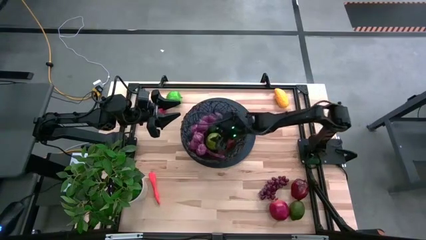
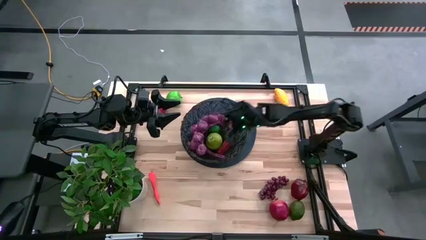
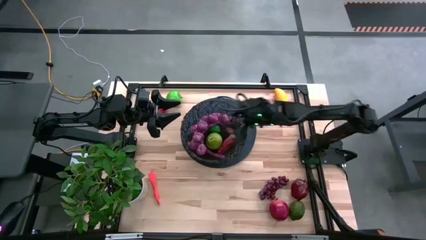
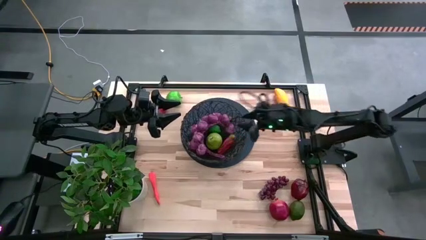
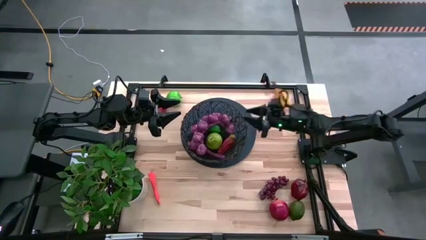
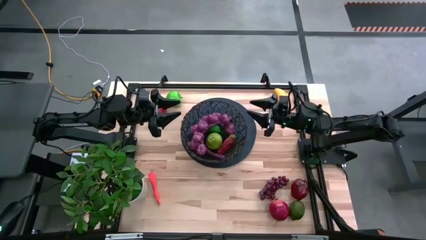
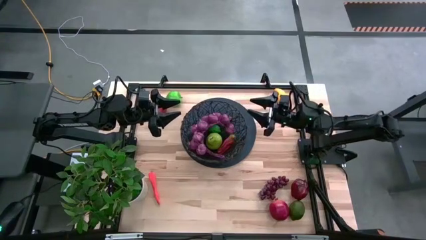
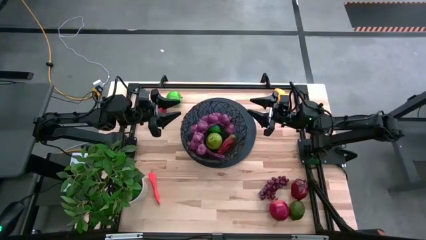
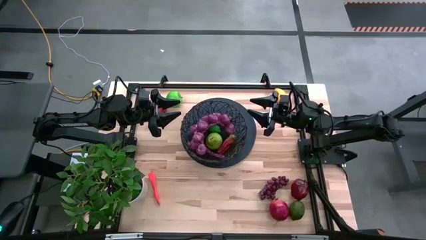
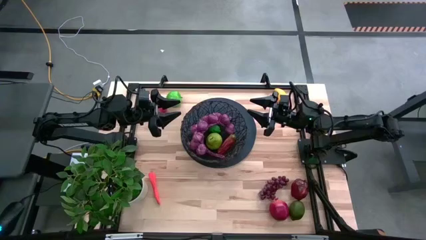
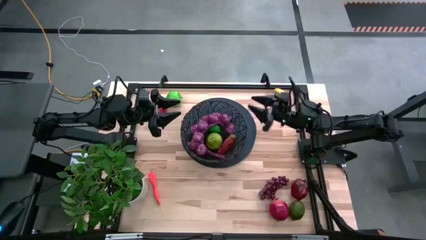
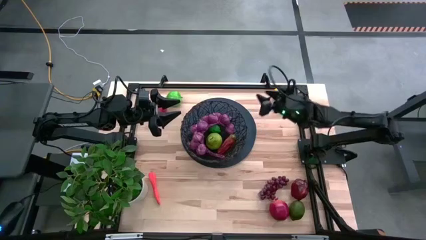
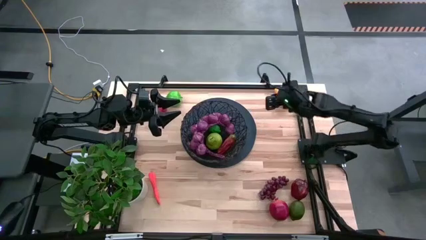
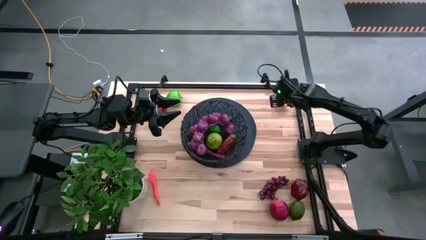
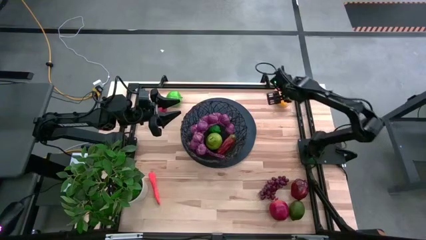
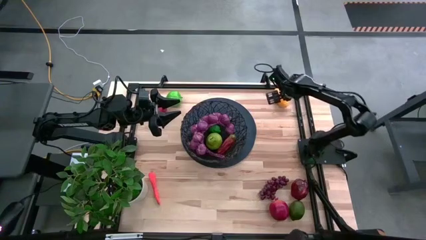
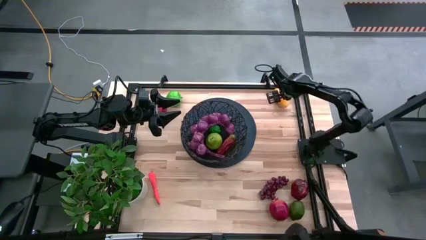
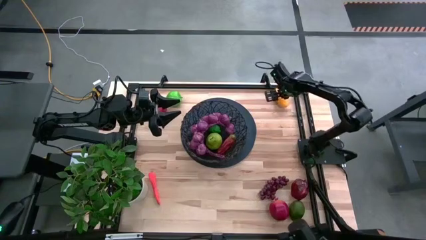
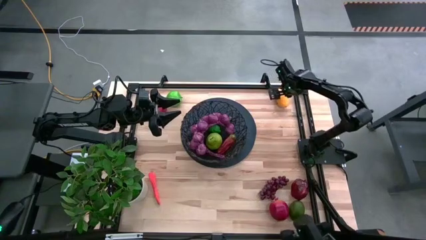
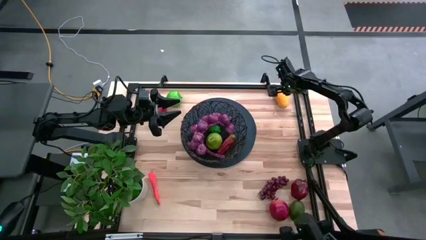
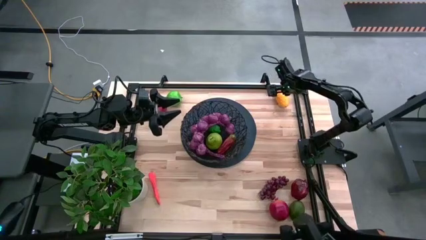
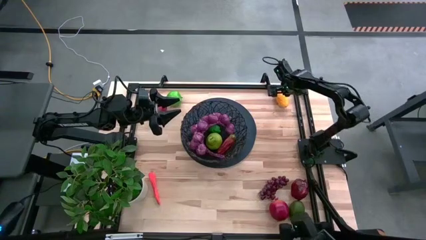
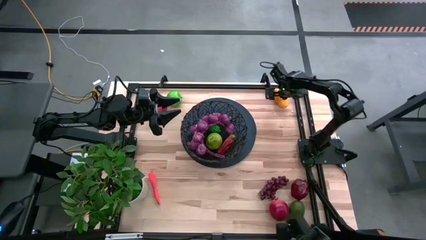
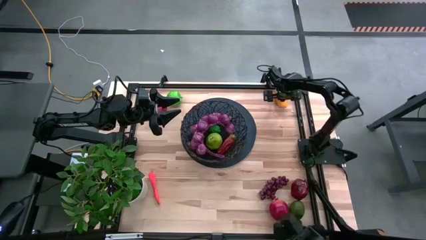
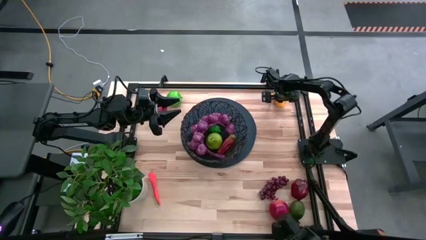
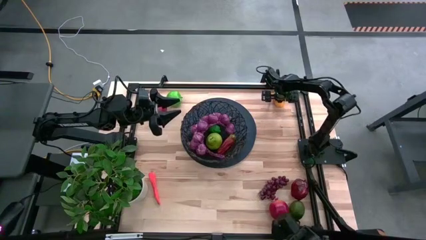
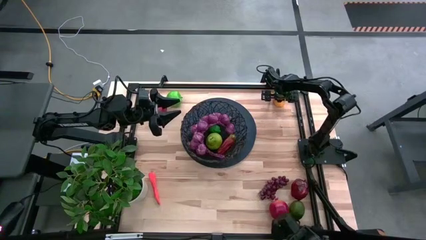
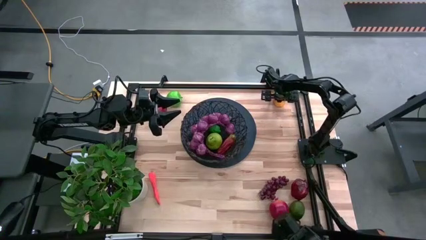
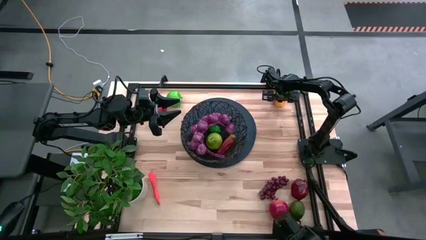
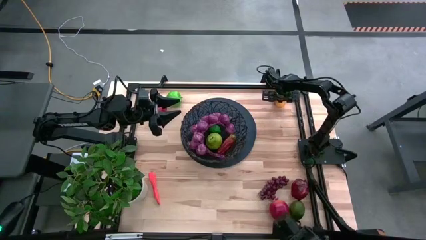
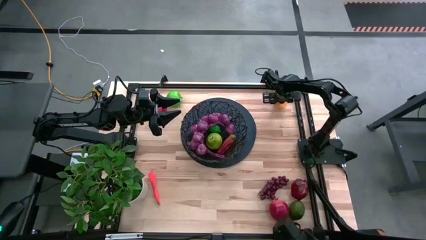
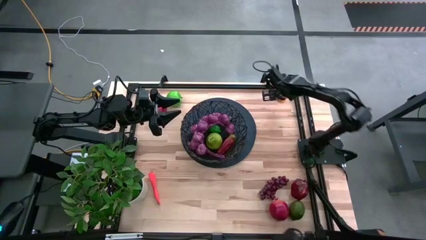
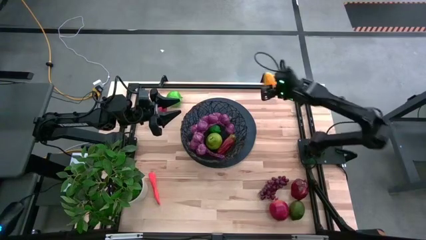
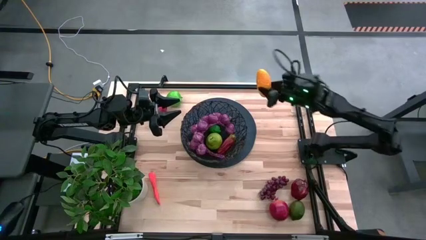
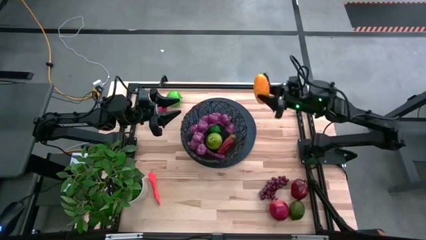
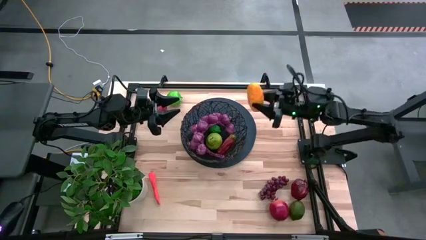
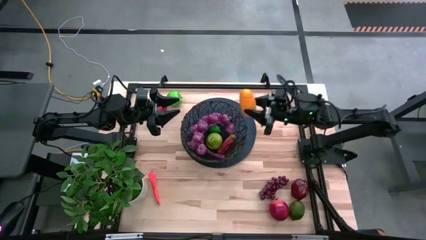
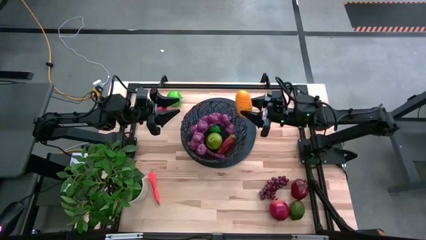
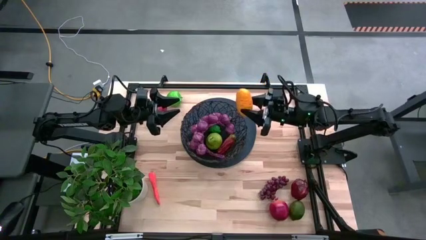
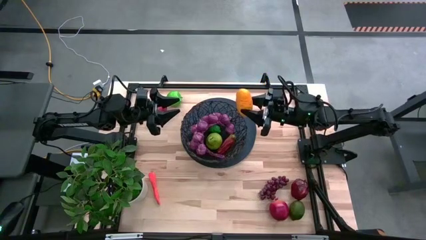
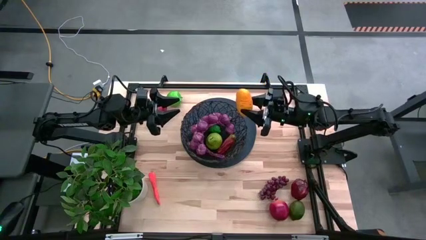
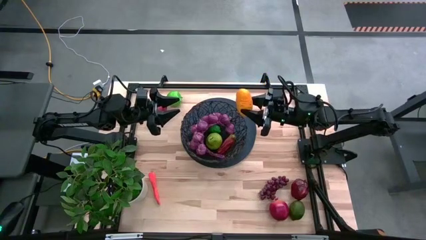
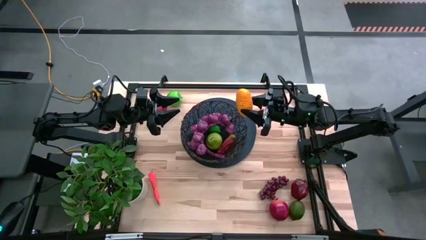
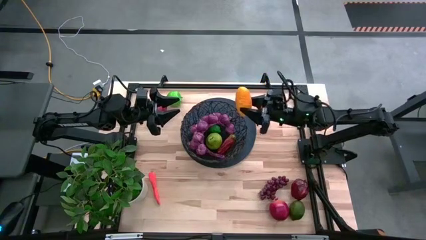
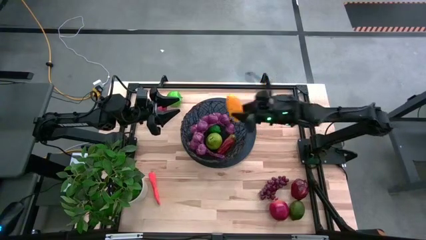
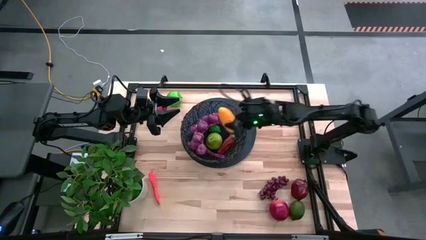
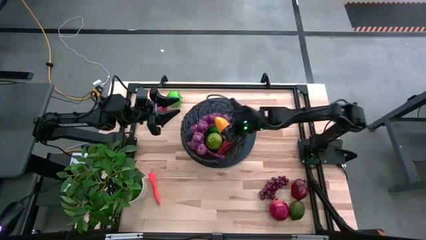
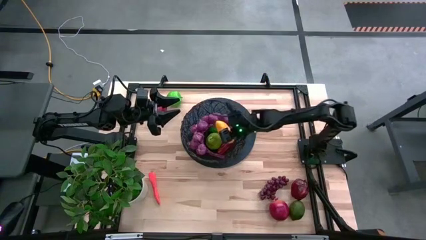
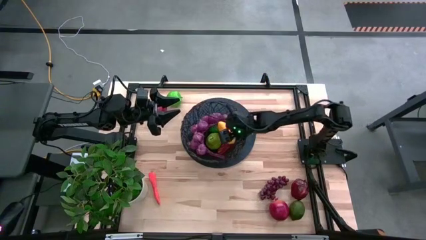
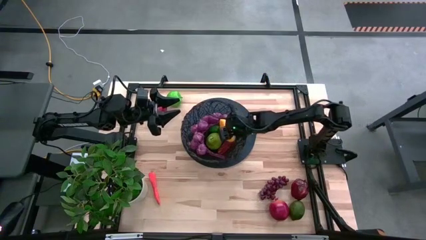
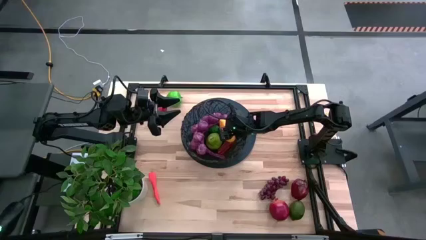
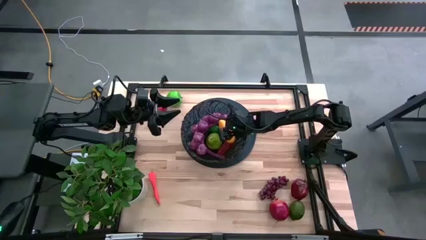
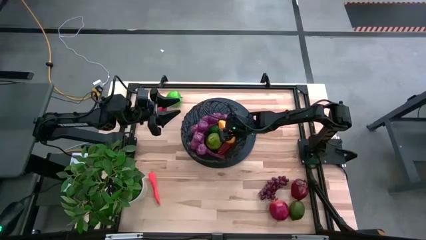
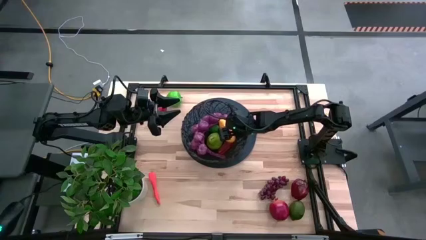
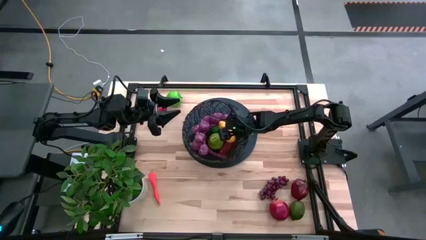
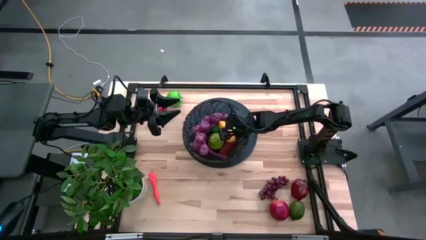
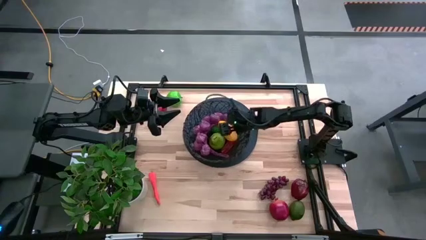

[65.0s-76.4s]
Task: Build produce basket
Put the yellow mango into basket
